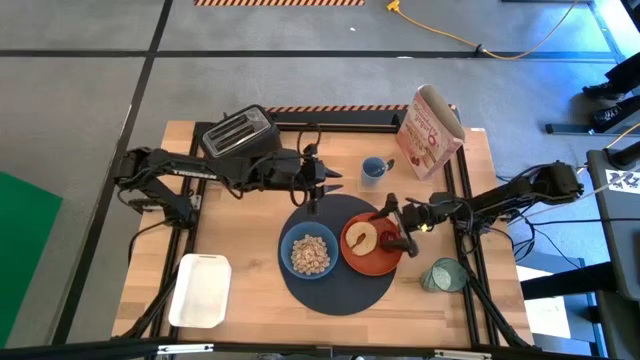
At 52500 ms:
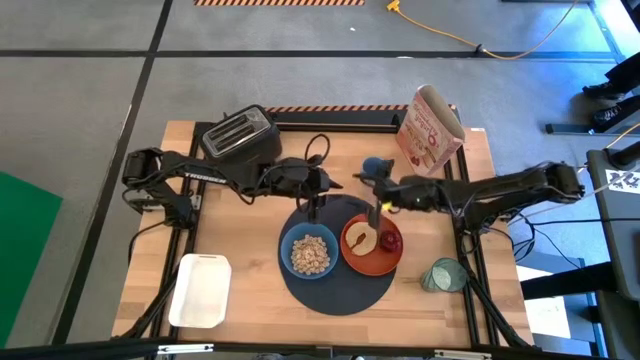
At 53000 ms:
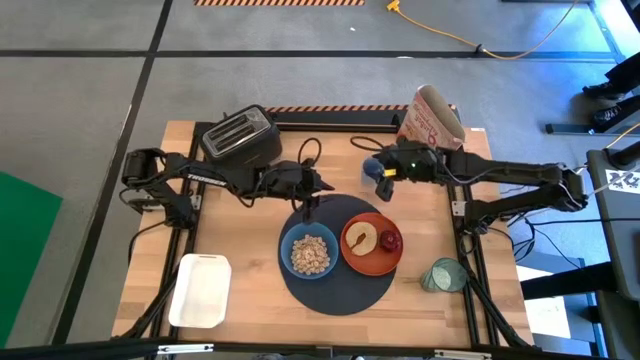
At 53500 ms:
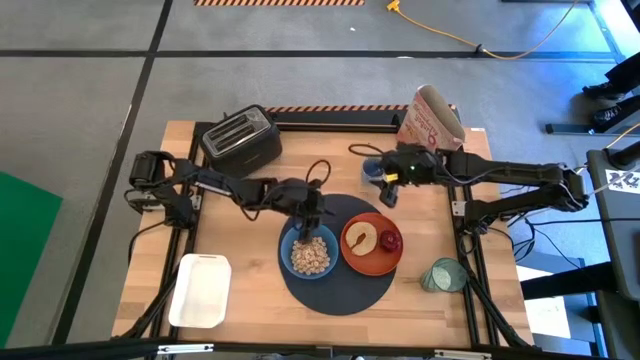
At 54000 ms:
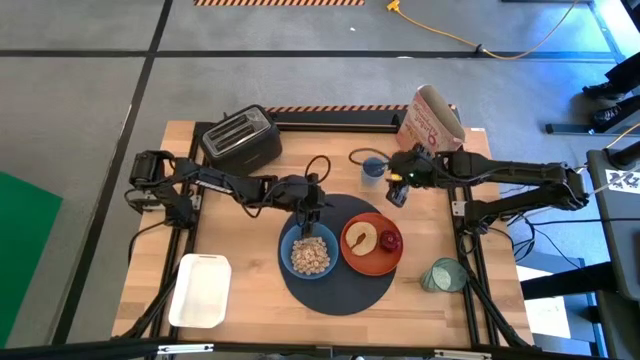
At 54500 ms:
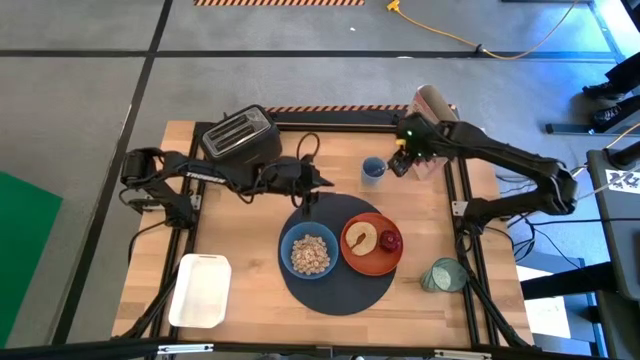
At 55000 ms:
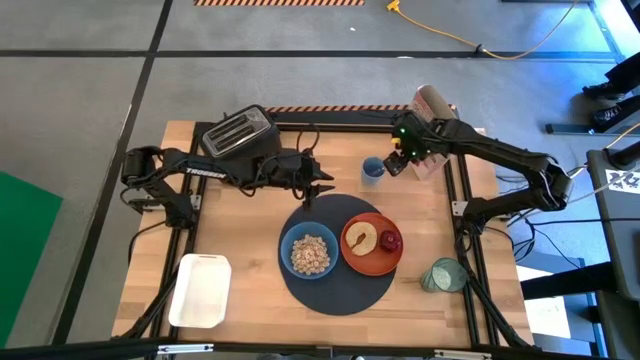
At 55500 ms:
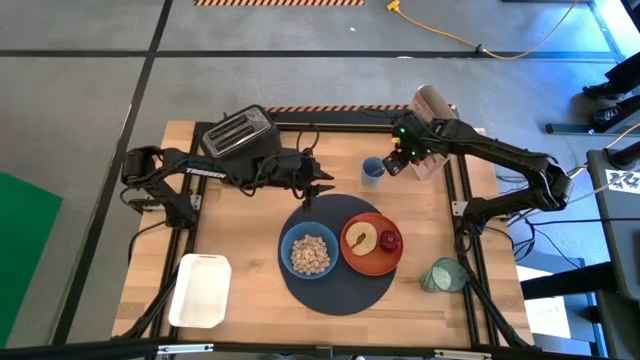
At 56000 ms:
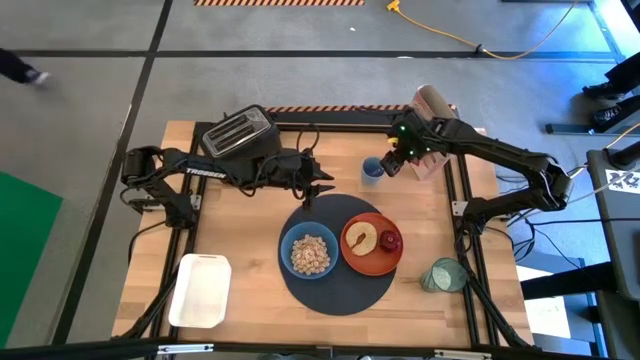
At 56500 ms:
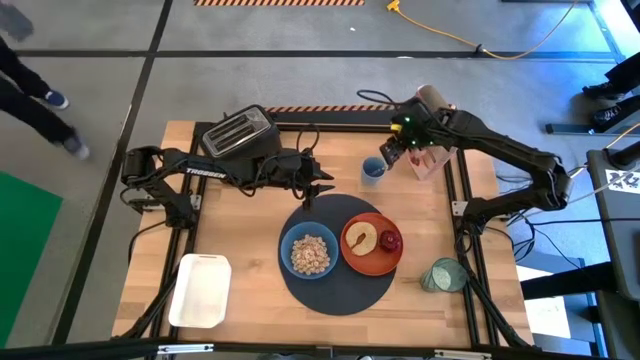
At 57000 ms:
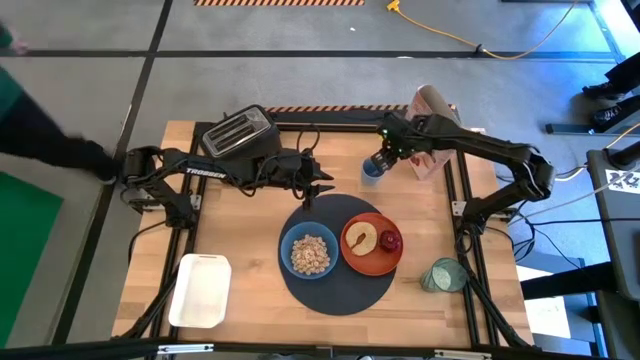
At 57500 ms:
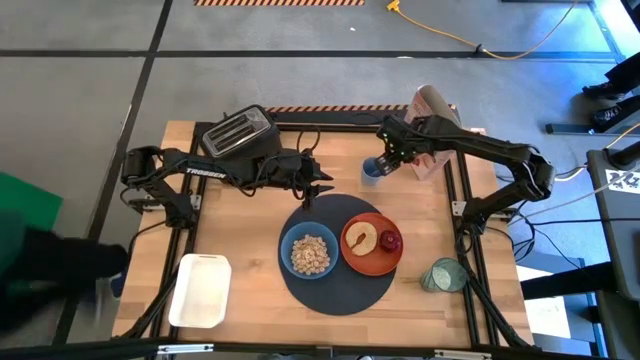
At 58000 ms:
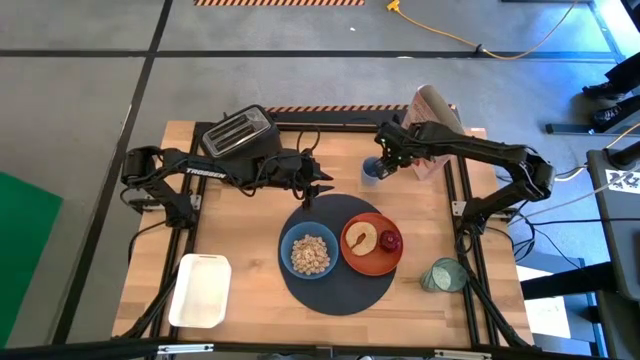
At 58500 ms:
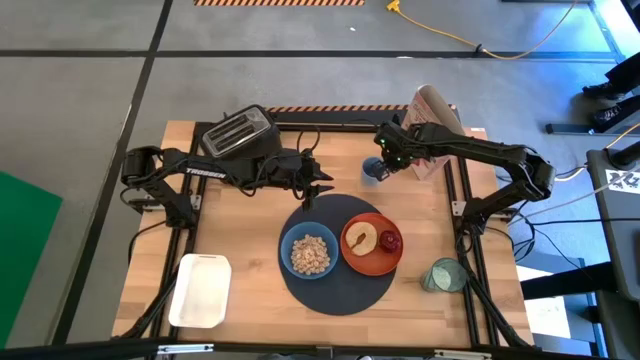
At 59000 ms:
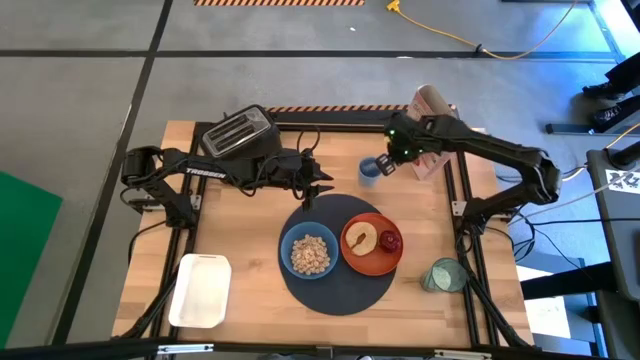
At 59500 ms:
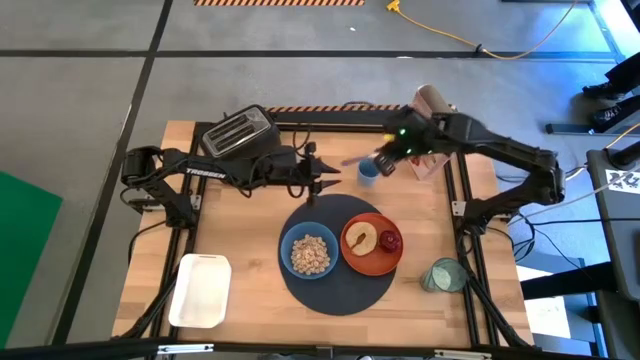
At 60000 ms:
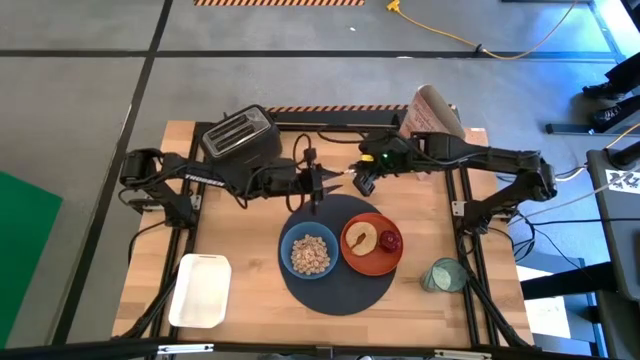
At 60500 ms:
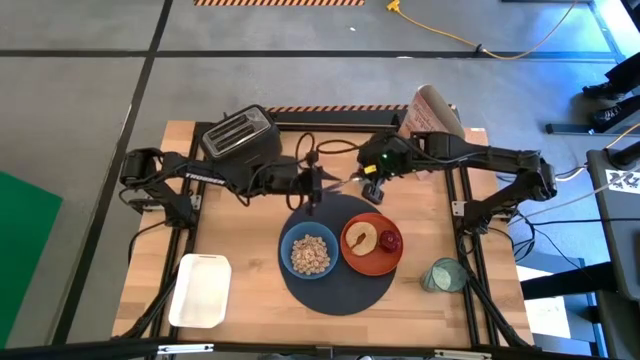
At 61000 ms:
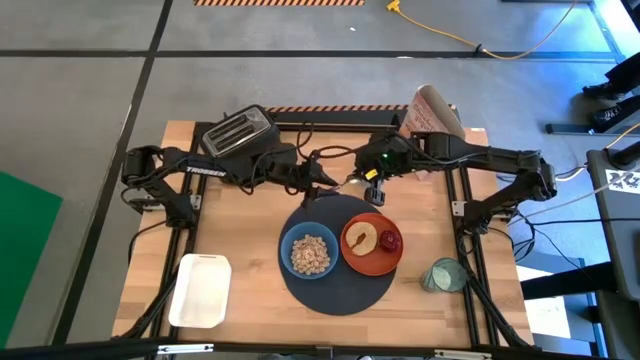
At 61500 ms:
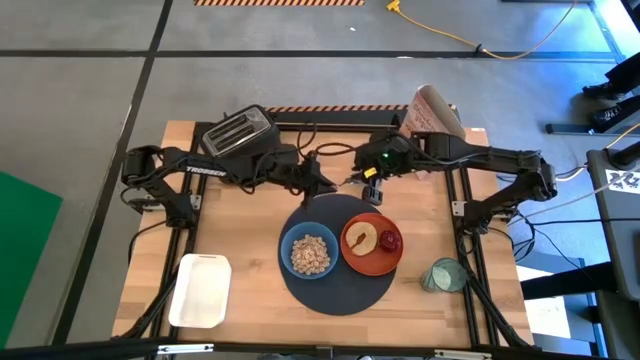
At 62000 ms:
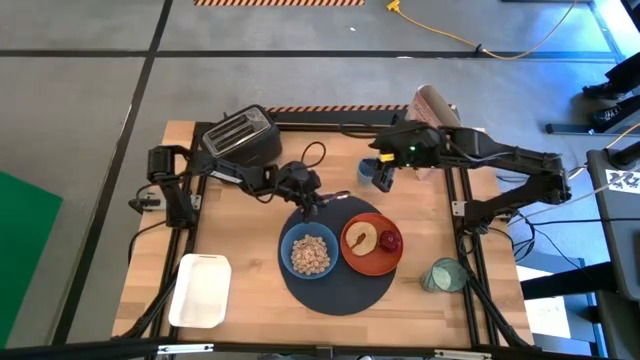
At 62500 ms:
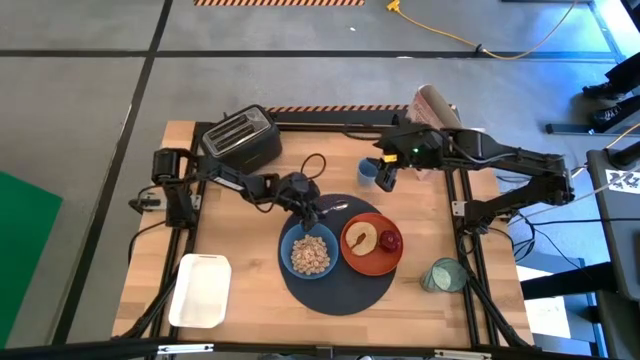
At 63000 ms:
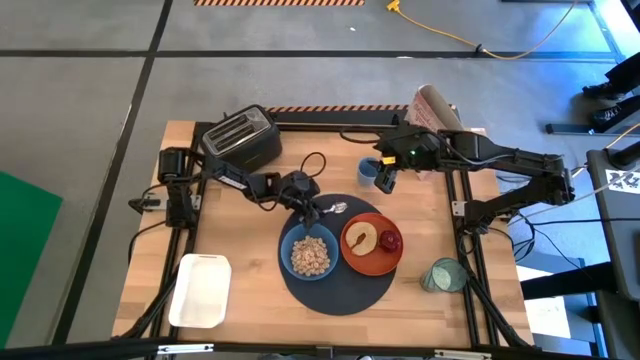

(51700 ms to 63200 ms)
Task: Arrange a breakfast setting
Put the purple spoon on the top left of the placemat

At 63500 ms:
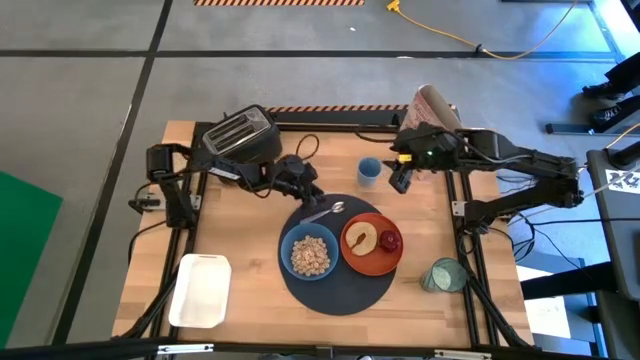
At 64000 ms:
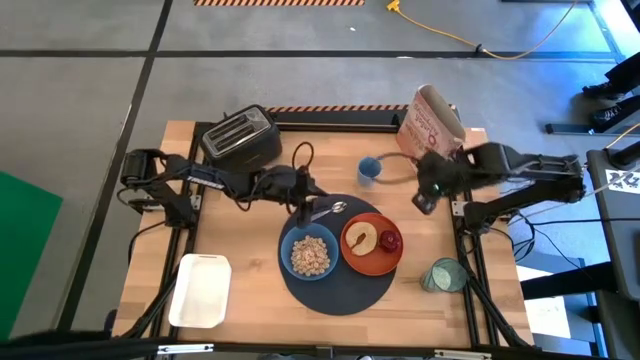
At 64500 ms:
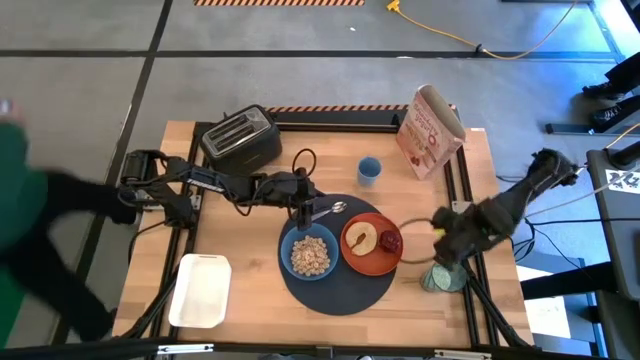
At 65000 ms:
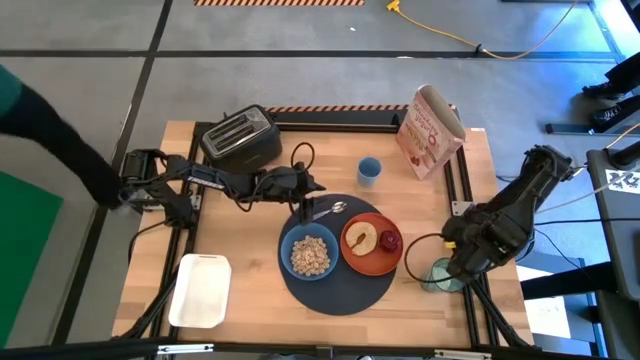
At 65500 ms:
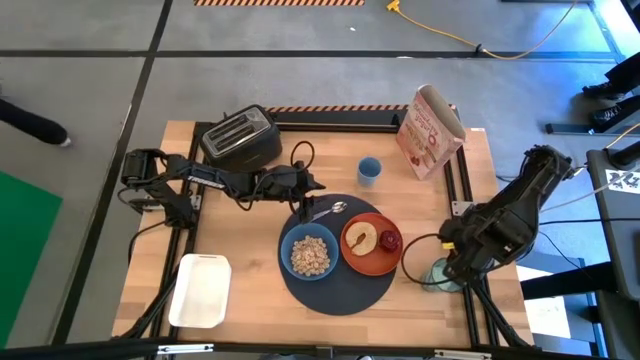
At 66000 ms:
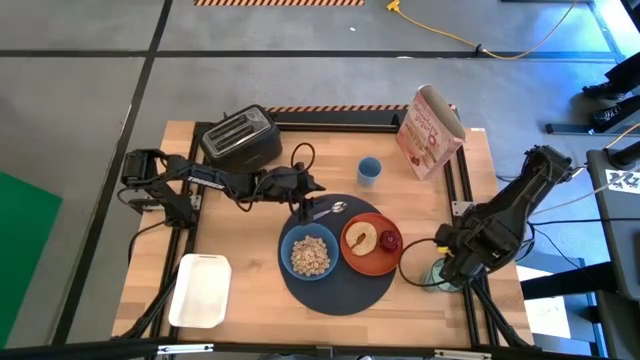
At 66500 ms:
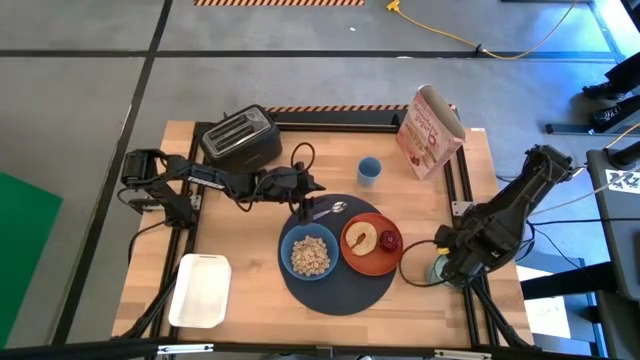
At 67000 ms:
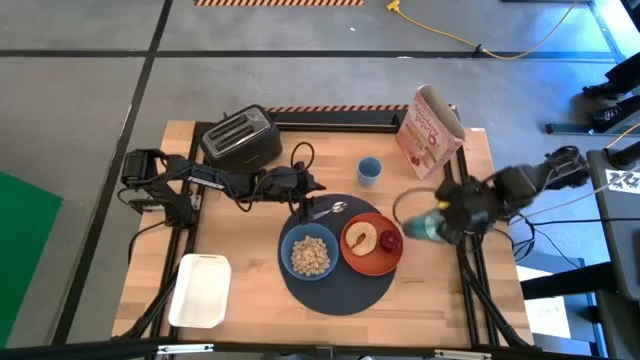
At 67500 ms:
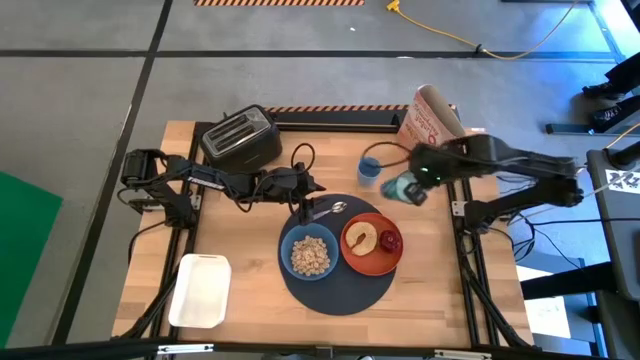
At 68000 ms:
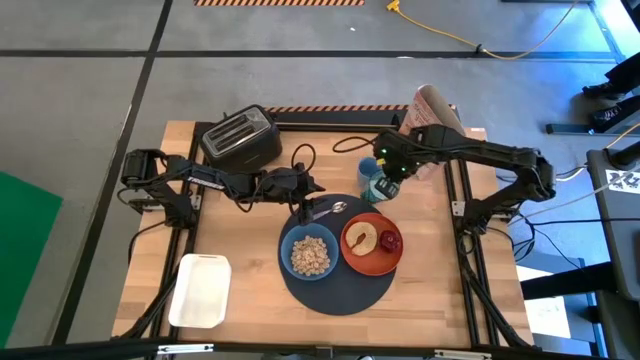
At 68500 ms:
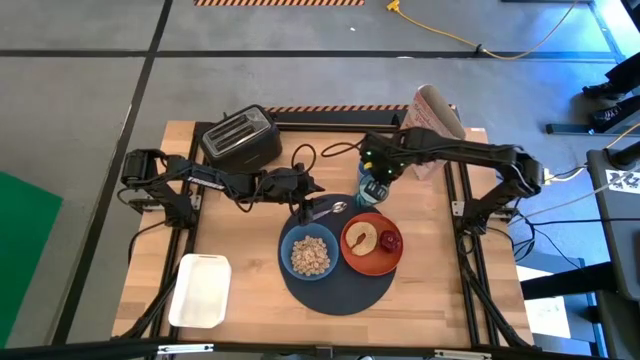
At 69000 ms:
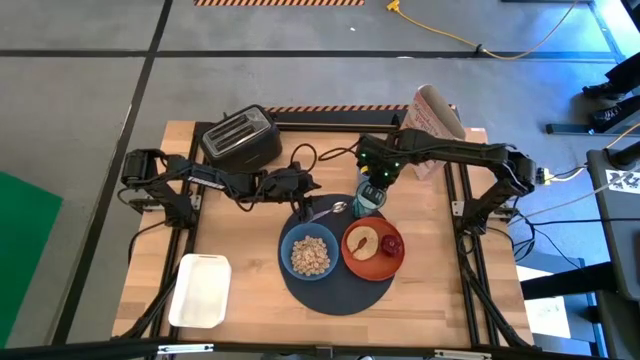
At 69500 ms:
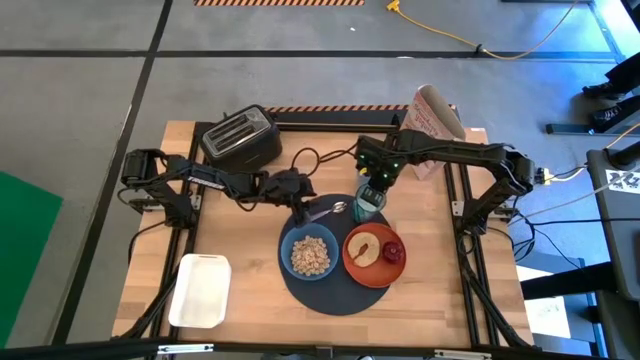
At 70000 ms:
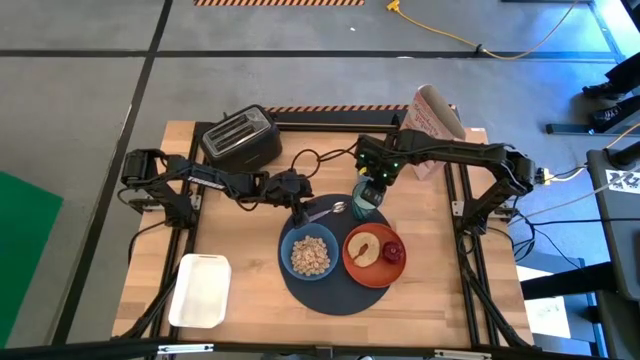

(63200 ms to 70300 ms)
Put the blue cup on the top right of the placemat

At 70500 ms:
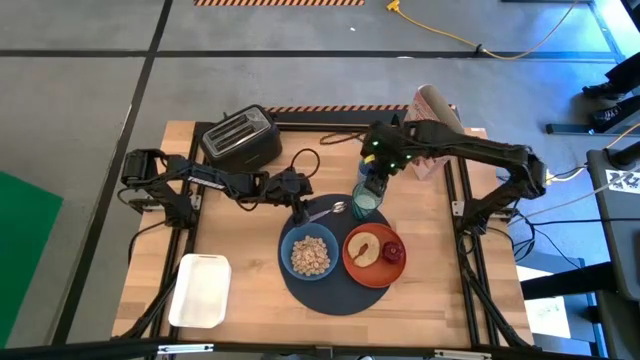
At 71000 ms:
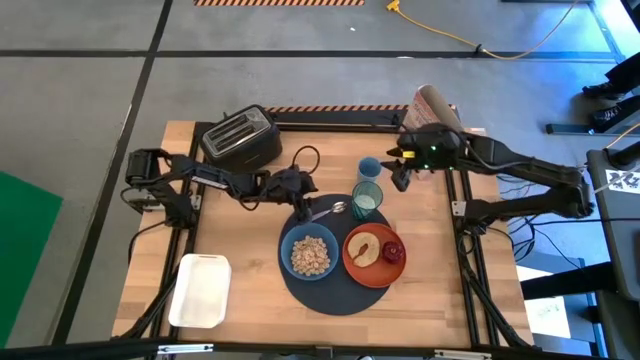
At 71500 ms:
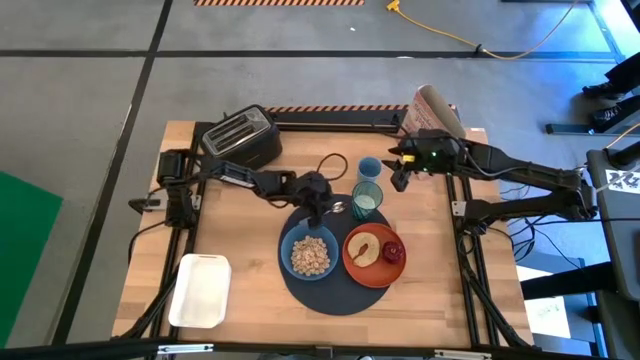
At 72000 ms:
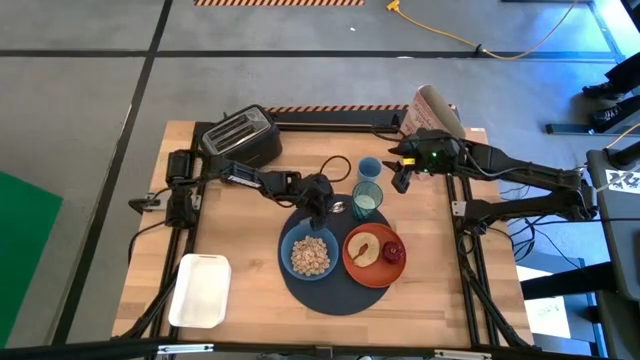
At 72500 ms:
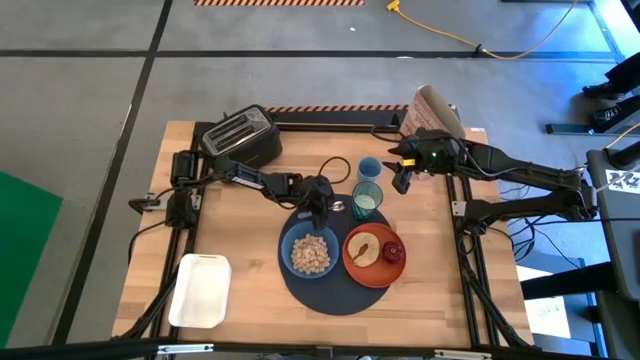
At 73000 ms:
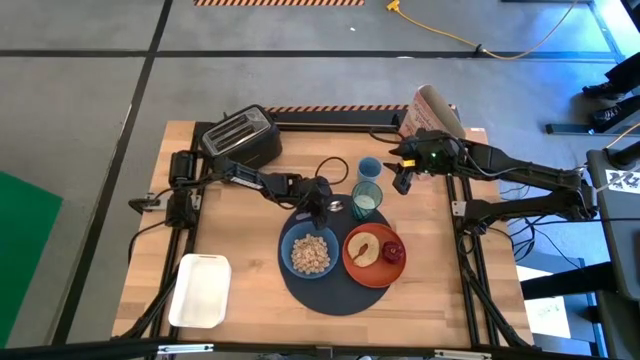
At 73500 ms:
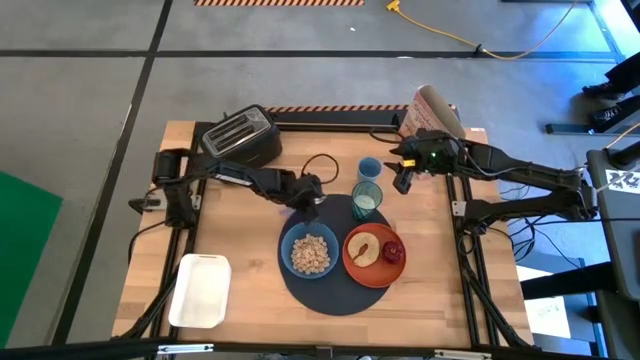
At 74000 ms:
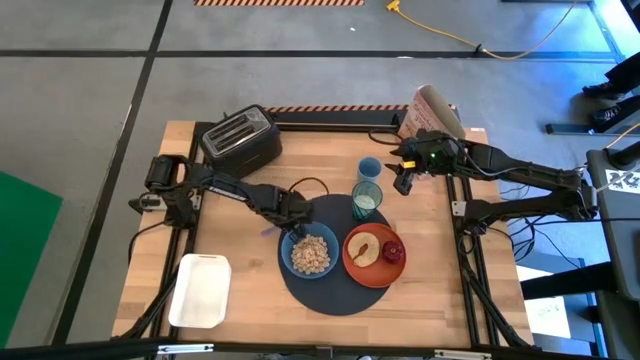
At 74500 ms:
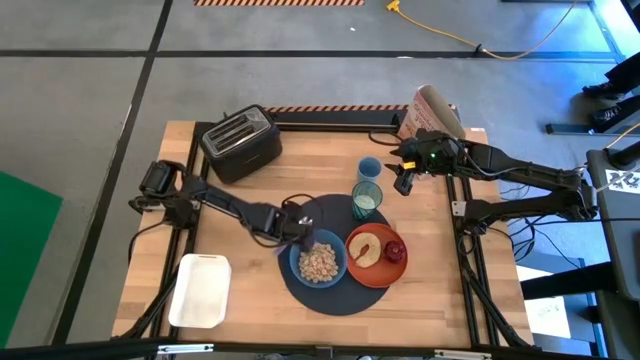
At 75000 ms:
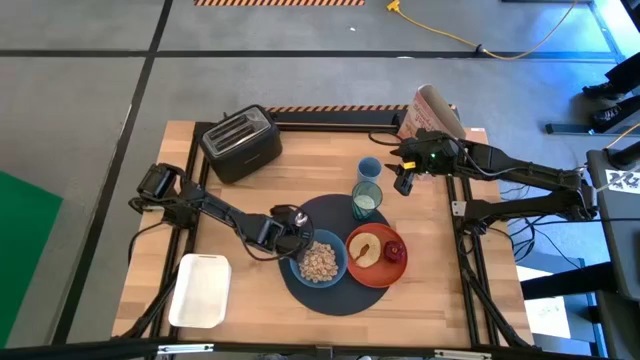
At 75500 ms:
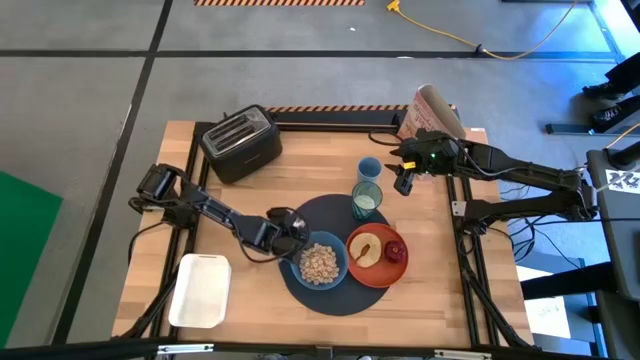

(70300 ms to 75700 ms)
Adjust the purple spoon on the placemat
